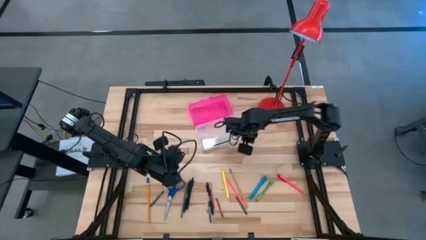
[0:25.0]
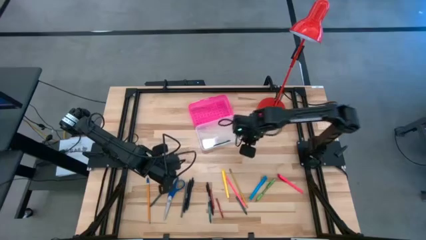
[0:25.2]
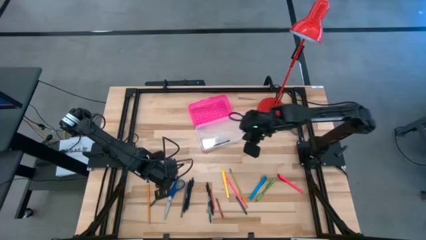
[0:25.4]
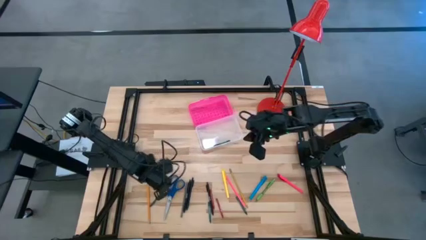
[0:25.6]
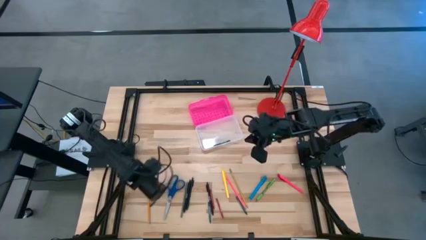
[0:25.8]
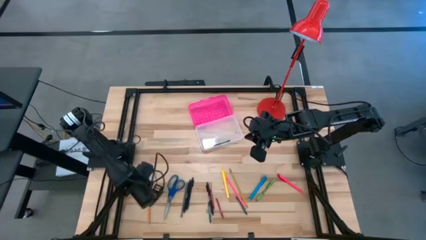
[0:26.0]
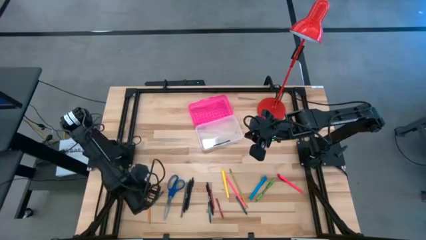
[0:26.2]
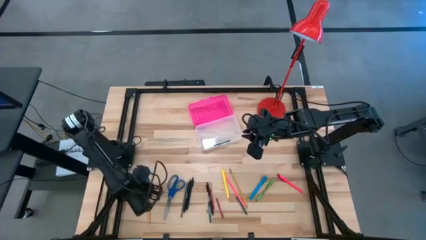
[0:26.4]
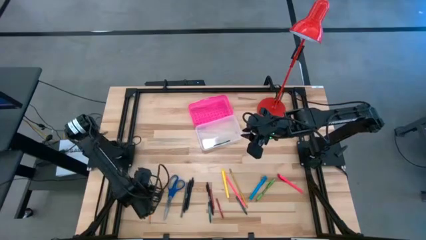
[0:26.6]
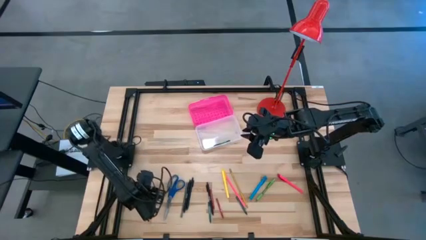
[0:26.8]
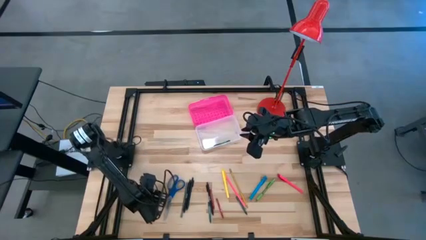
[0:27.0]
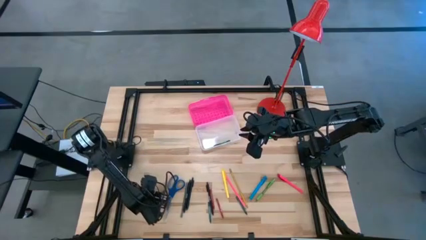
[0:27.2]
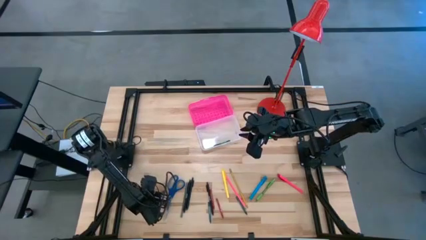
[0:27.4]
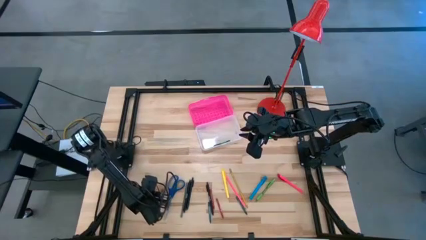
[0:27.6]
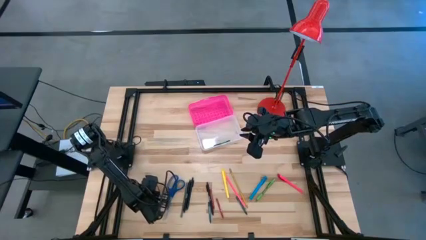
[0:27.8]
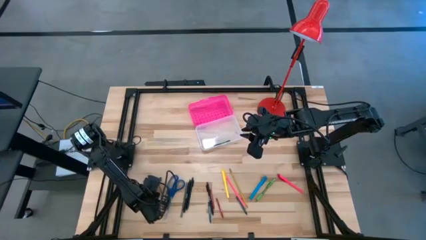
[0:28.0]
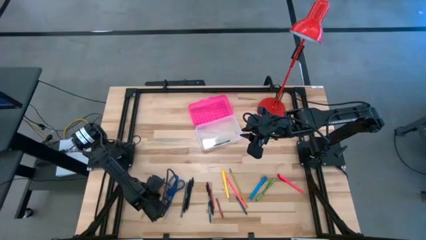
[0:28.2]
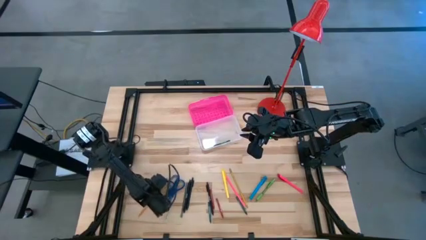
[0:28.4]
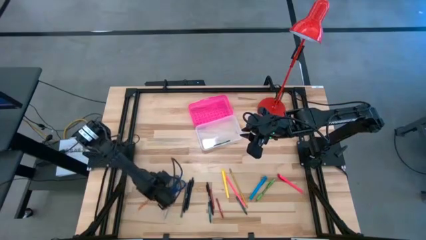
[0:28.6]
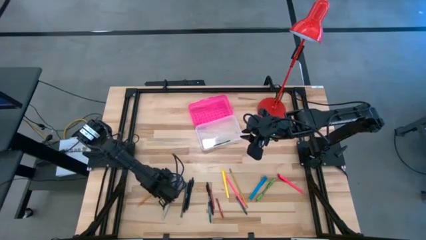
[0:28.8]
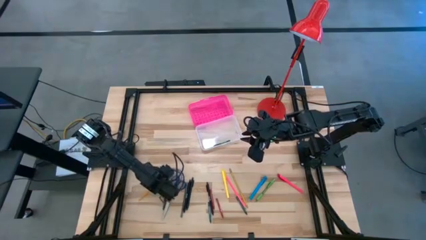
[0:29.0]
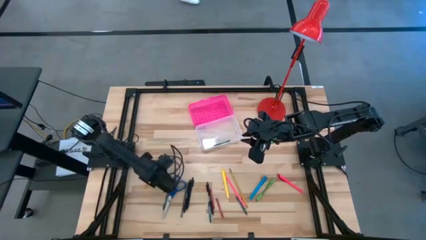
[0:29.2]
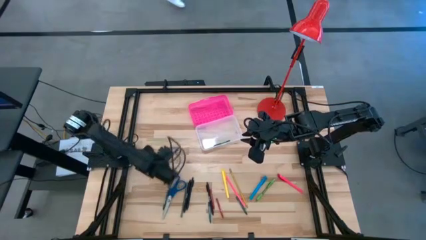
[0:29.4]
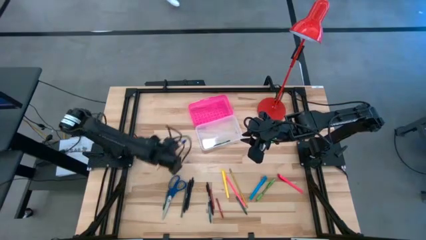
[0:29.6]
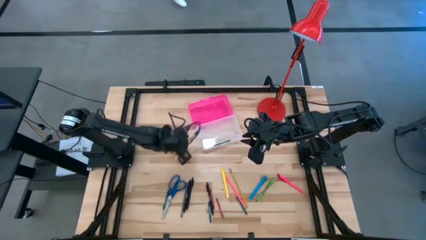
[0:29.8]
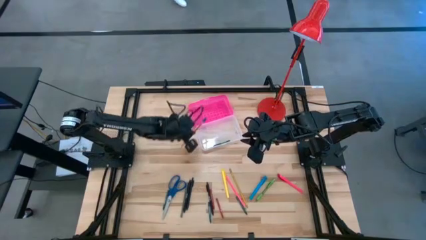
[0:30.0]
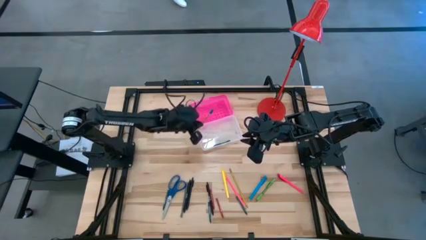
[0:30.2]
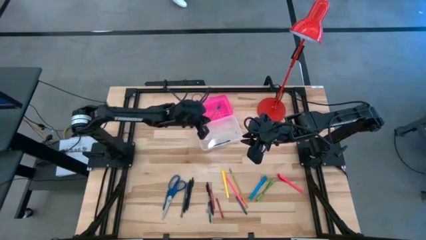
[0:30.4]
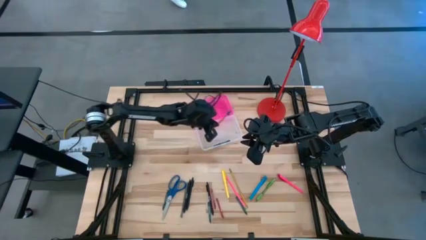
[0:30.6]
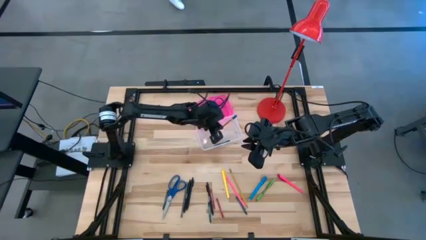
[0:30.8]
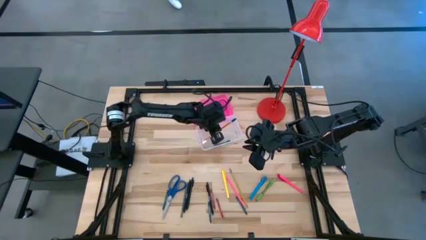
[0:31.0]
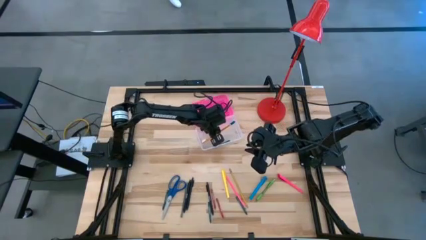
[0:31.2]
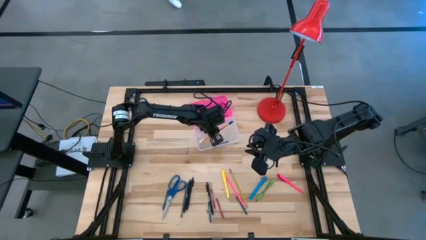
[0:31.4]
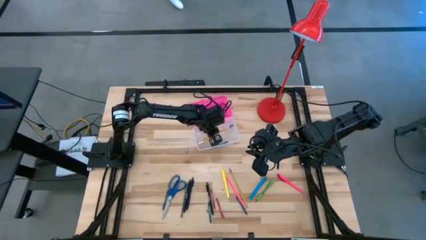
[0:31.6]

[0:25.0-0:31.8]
Task: Pick & place school supplies into a supply box
Put the orange pencil into the pink supply box

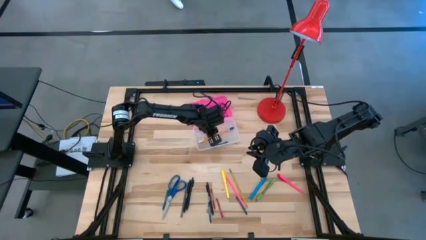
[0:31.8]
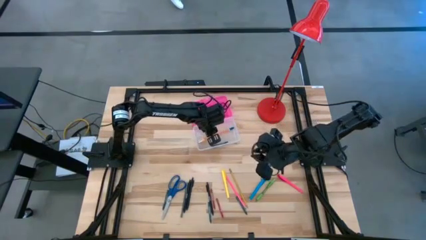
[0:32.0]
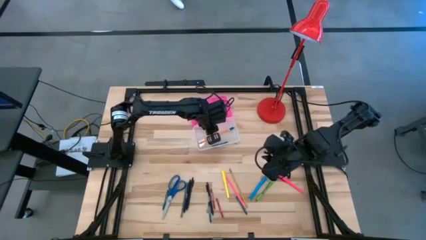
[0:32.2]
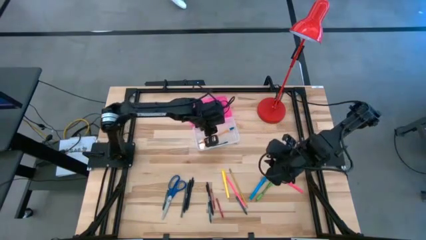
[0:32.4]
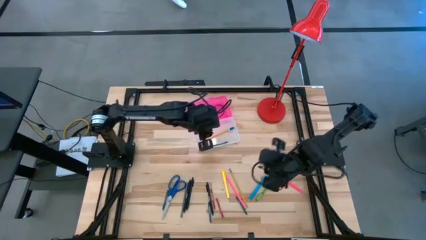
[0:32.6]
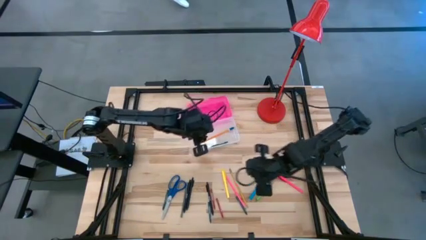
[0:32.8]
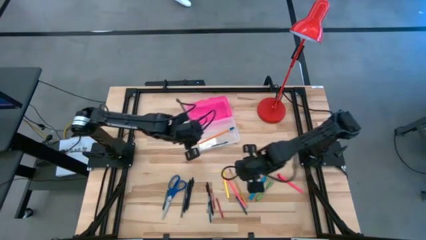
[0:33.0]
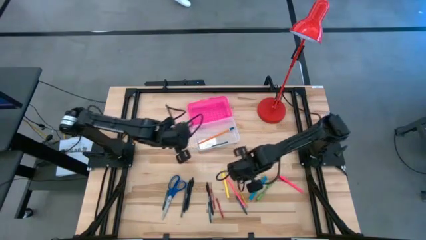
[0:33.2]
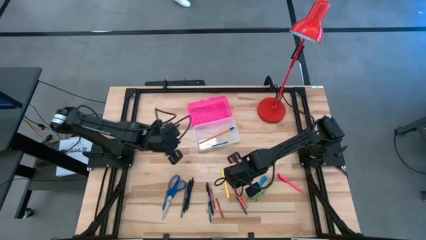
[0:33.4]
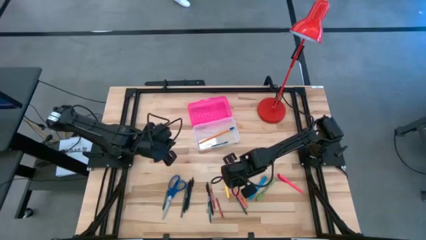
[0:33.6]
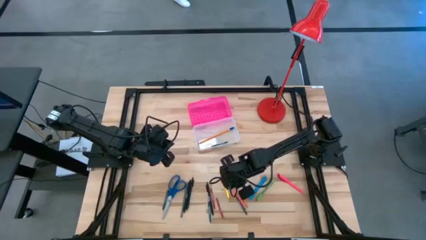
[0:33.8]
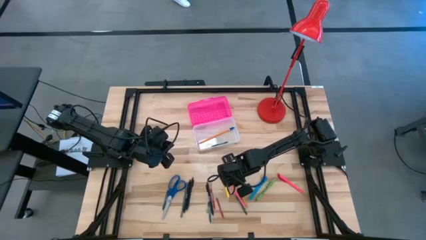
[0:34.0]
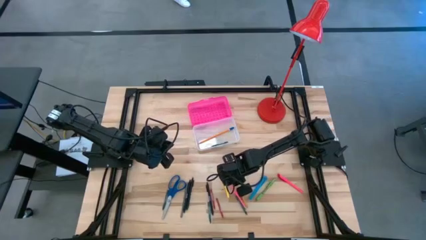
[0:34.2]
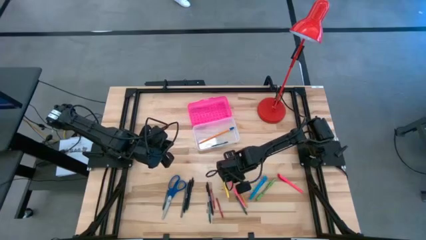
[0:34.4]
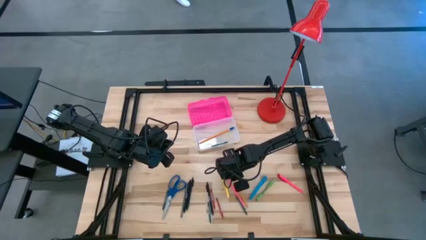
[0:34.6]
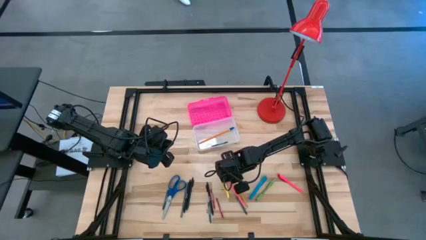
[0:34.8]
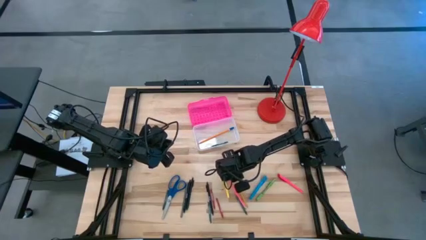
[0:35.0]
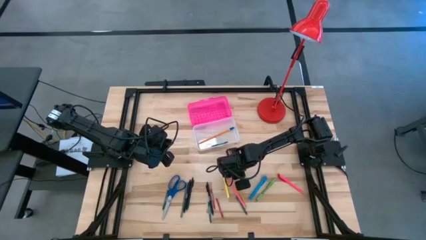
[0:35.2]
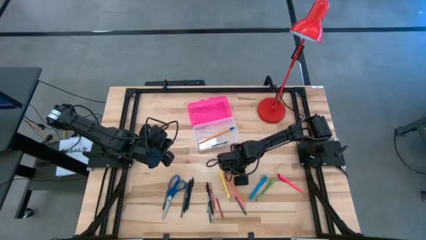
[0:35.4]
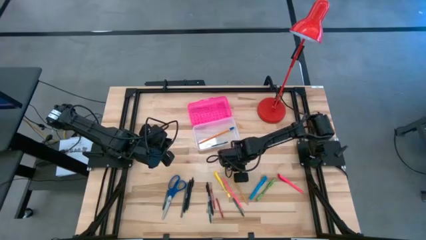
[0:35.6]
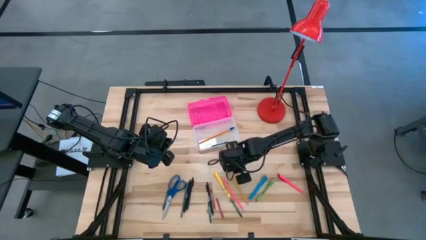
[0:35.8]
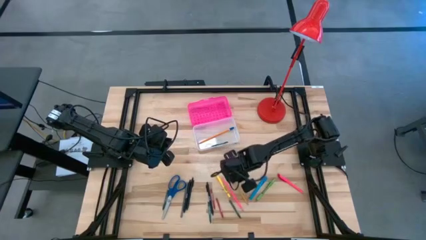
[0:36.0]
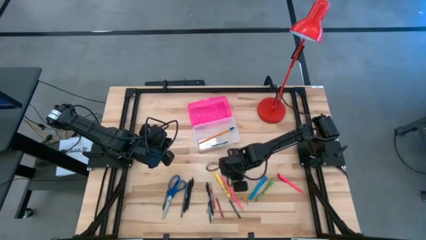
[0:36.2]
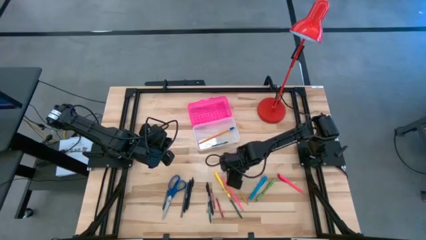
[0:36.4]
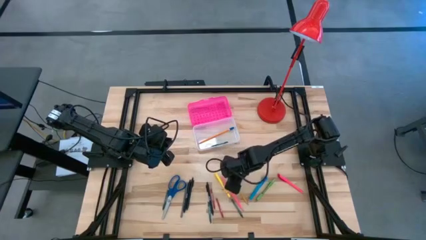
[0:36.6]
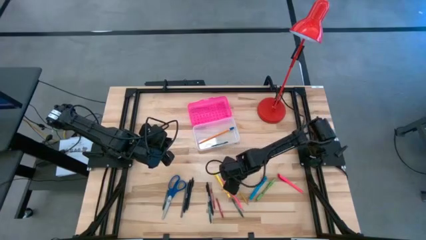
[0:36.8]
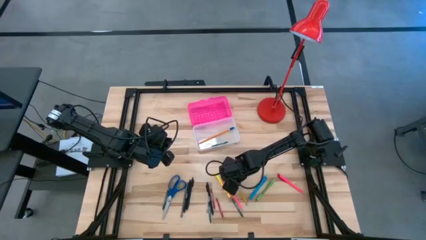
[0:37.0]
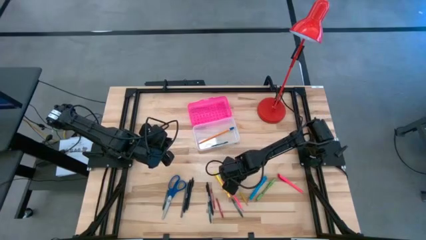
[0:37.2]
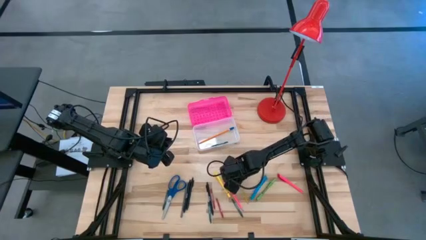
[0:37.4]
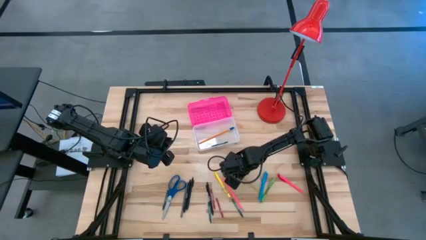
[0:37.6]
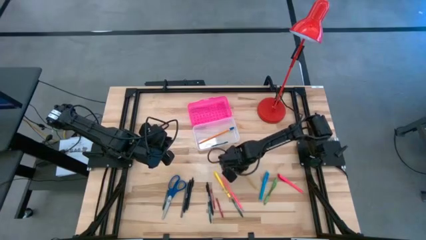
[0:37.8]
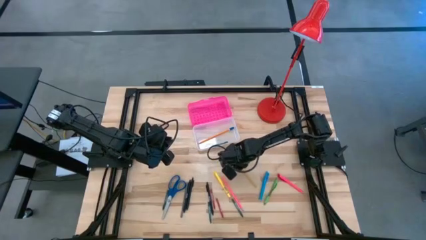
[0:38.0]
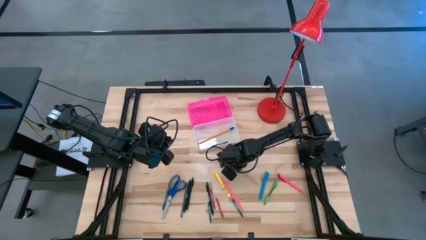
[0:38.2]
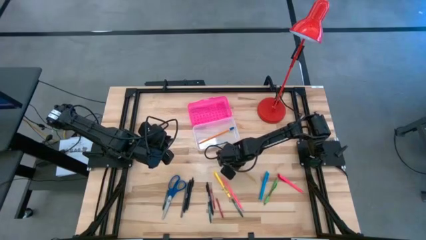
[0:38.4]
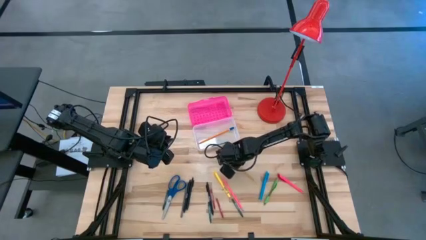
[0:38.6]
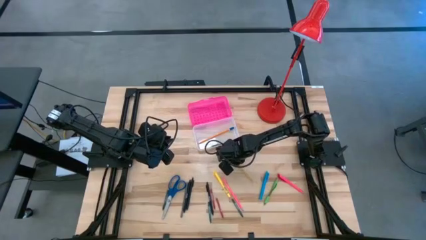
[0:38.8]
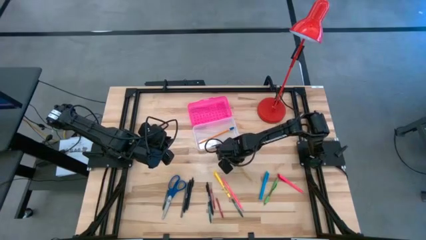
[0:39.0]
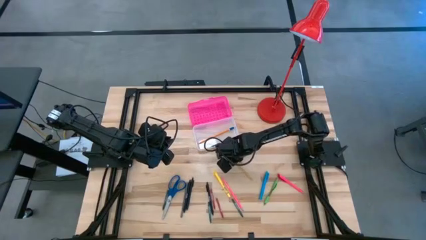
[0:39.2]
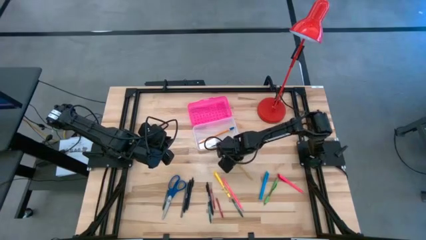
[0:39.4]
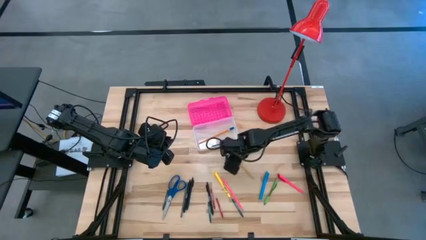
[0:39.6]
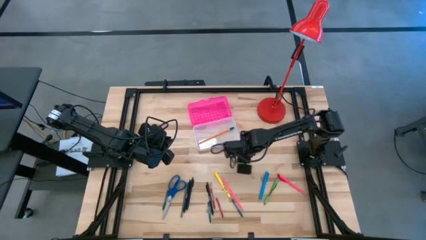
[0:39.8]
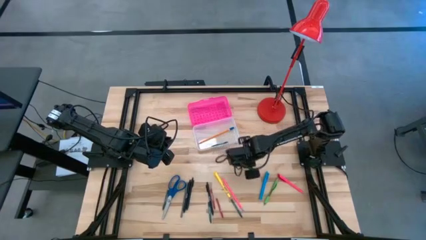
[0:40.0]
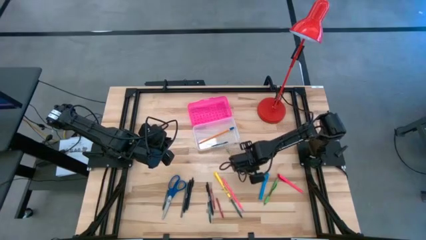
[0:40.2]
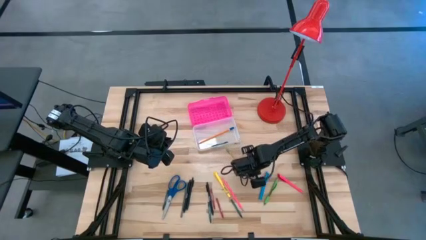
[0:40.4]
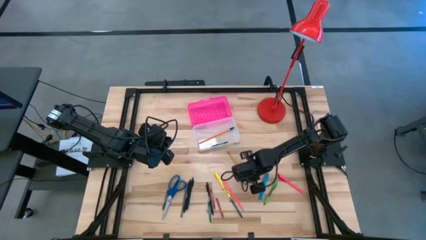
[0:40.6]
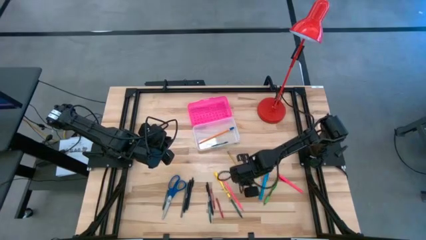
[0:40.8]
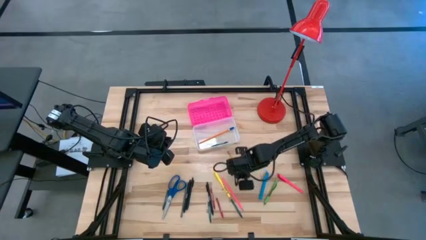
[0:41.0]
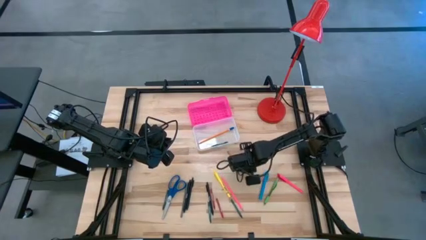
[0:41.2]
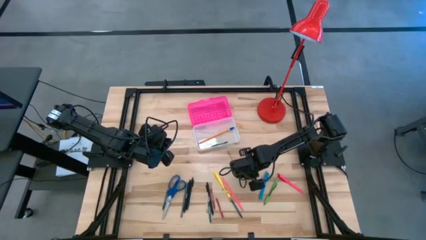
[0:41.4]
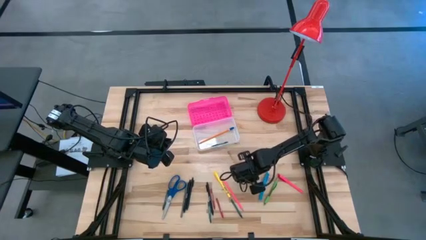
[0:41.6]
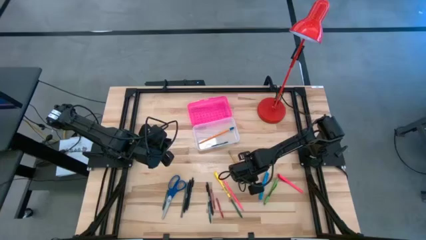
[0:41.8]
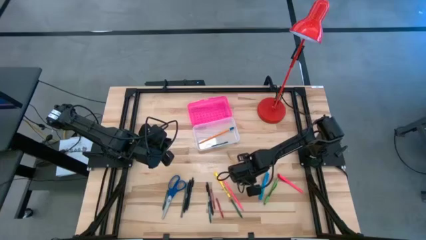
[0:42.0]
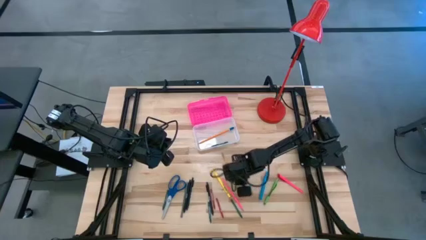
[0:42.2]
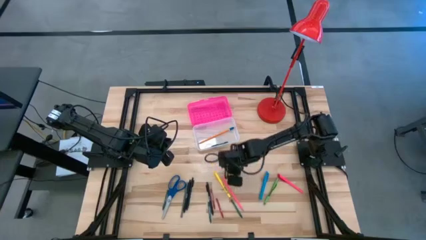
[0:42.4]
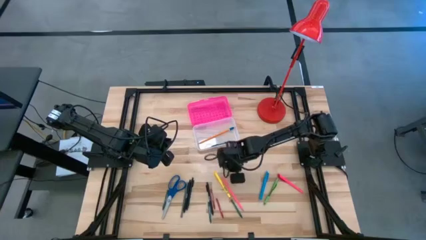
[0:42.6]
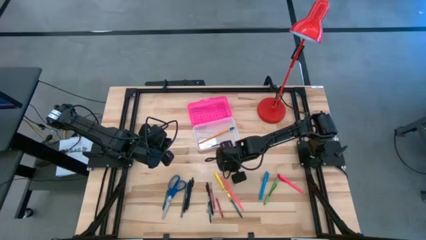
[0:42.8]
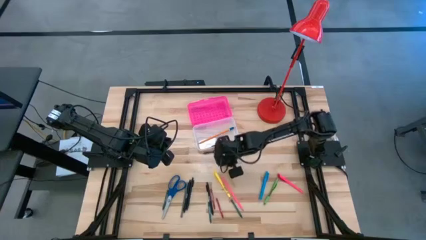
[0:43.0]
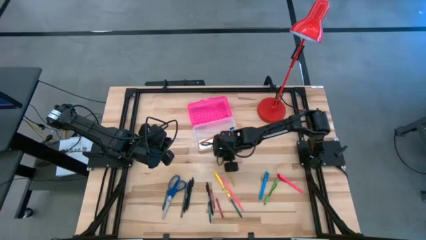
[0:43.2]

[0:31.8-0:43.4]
Put the yellow pencil into the pink supply box
